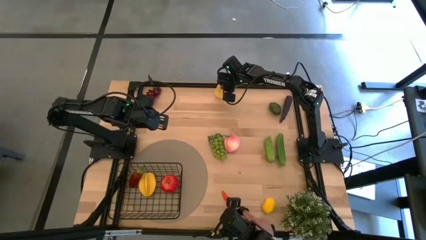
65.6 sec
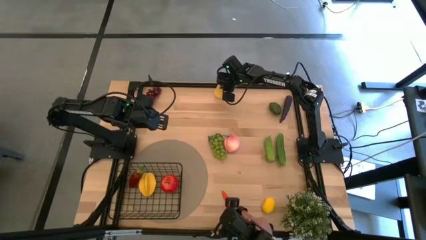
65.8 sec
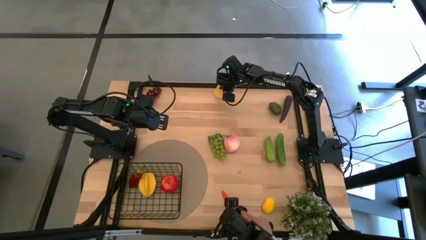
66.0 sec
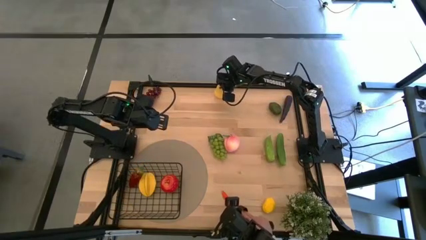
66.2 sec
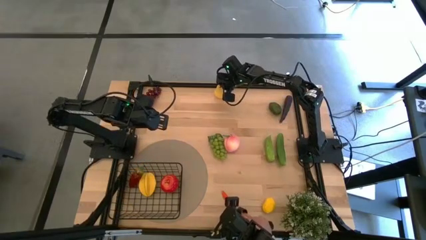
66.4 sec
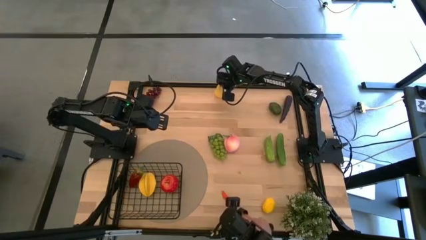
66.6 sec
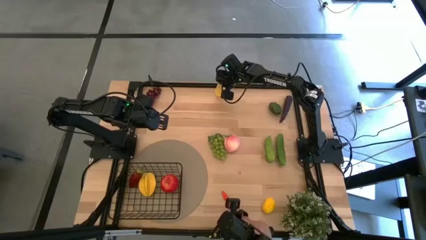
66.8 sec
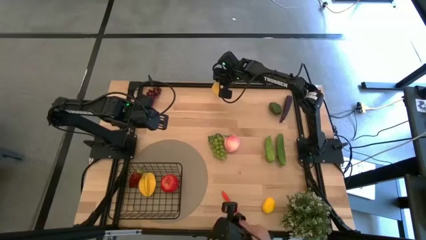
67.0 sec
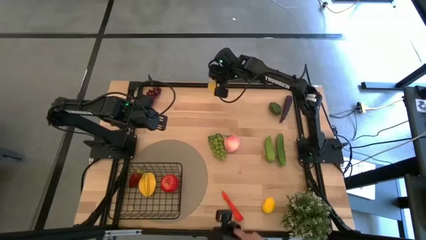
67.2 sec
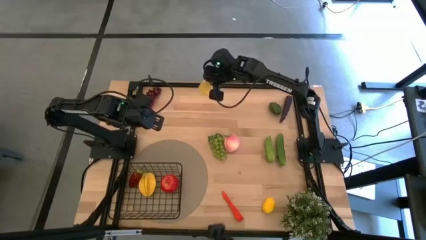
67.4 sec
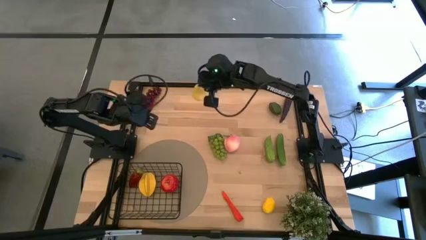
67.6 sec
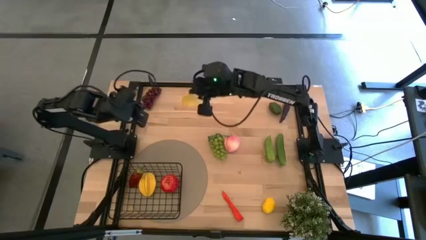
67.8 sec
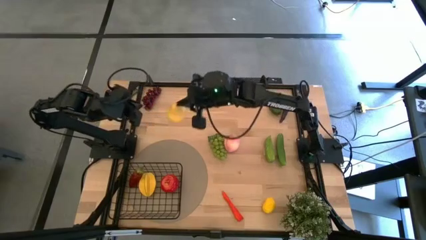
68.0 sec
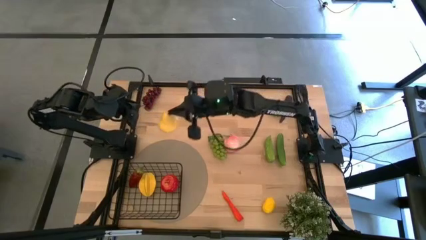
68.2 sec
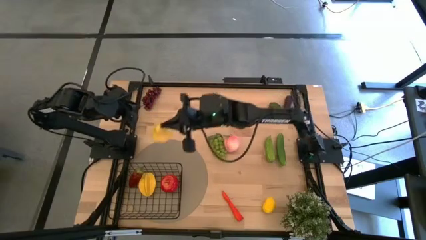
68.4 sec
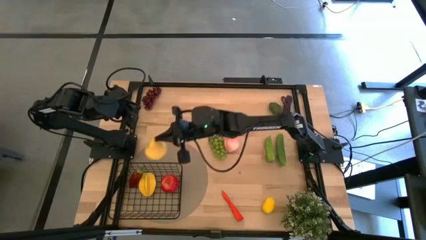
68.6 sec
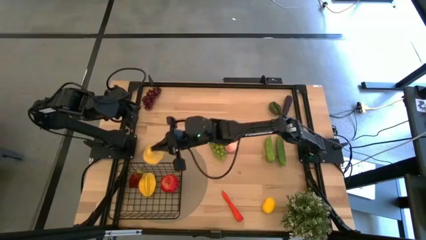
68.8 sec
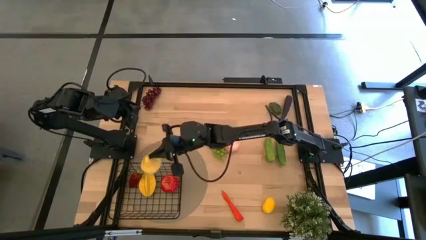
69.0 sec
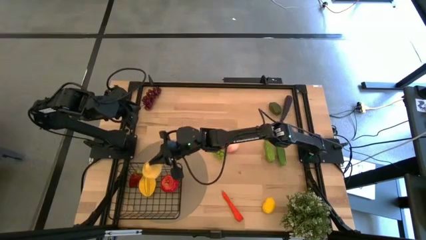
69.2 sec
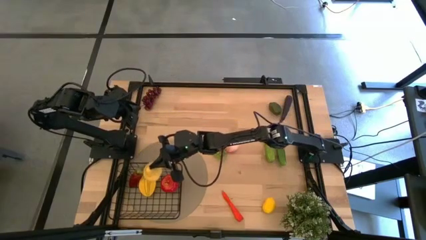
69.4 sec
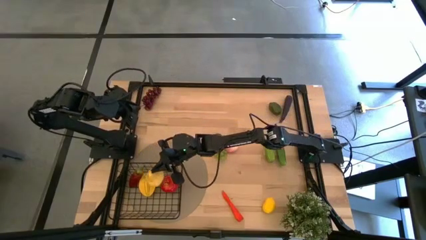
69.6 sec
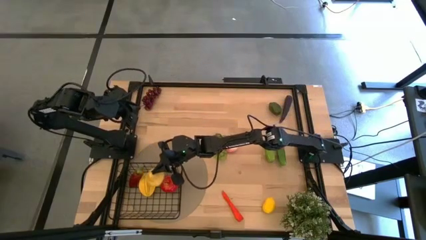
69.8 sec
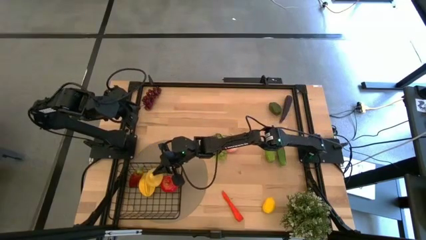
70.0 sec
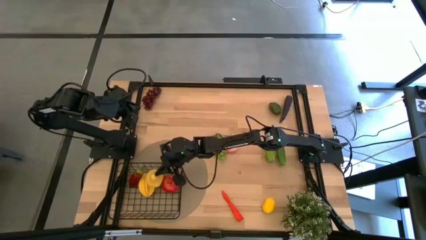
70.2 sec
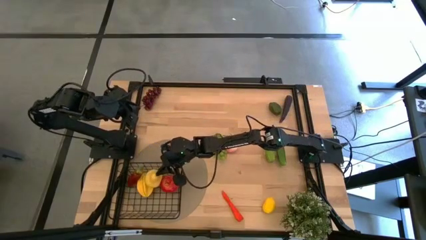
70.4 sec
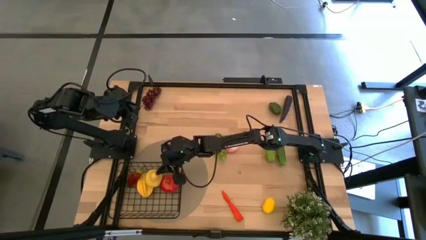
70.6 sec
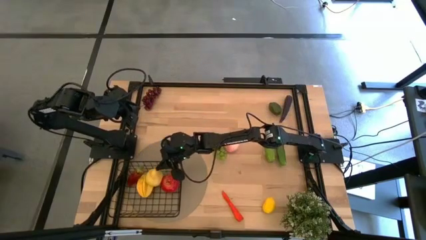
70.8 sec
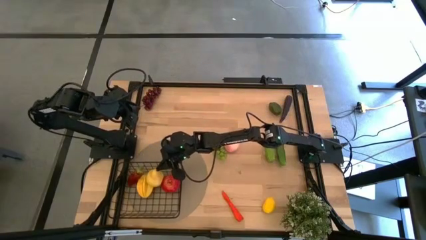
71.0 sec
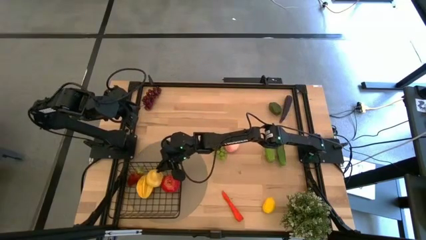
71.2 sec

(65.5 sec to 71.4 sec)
Task: Build produce basket
Put the yellow pear into wire basket

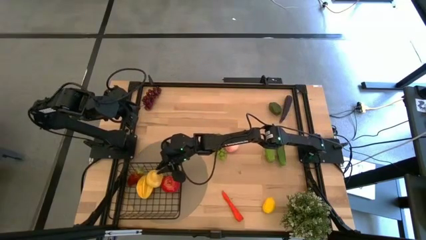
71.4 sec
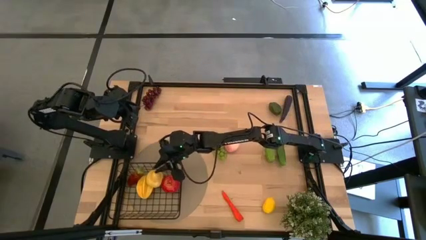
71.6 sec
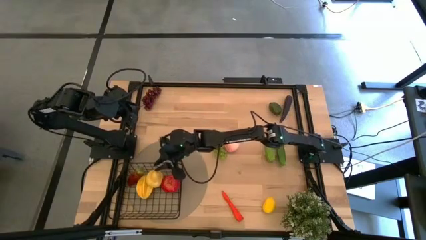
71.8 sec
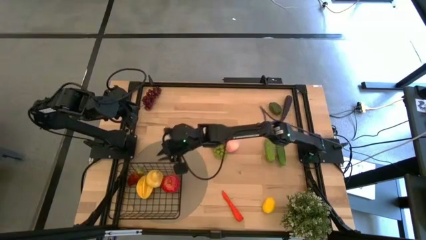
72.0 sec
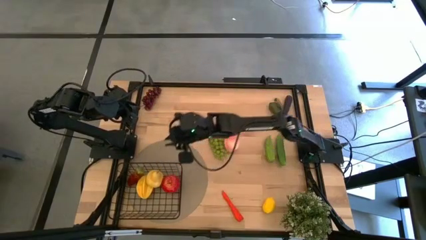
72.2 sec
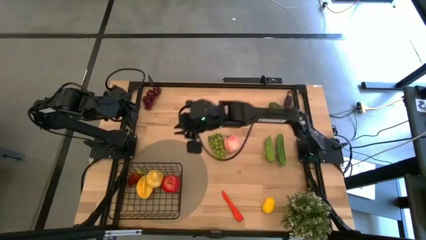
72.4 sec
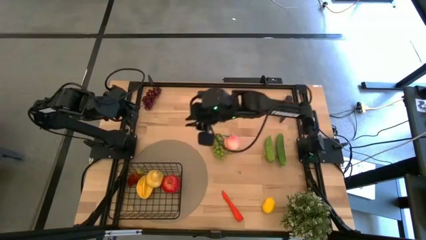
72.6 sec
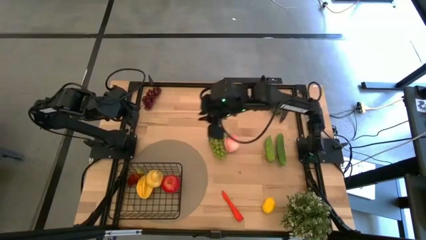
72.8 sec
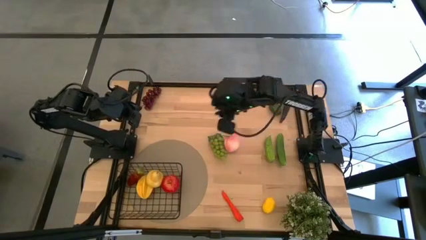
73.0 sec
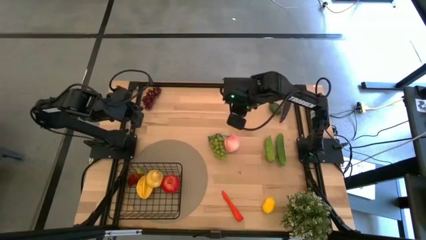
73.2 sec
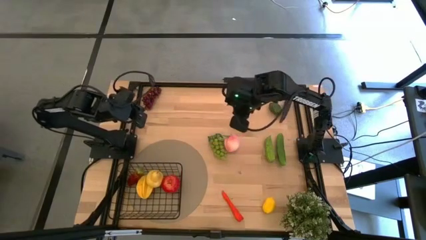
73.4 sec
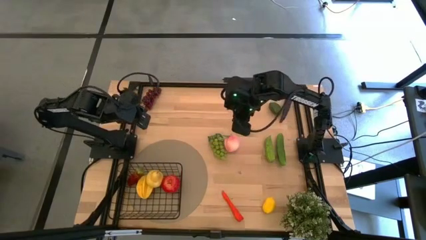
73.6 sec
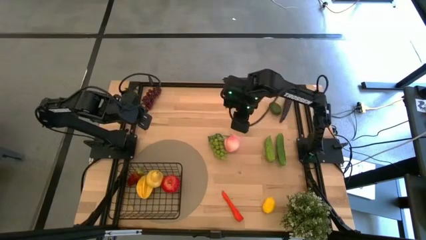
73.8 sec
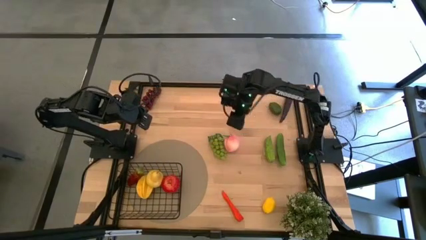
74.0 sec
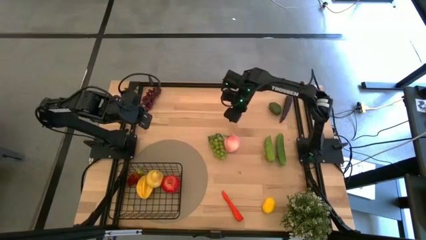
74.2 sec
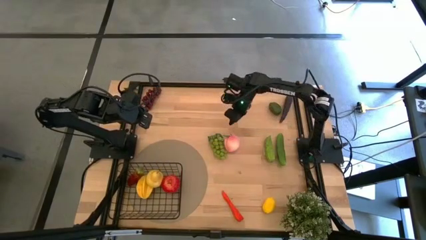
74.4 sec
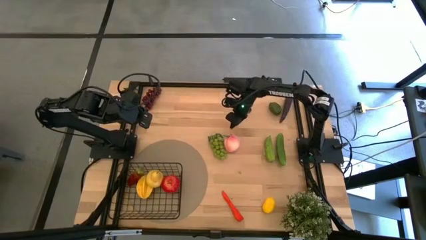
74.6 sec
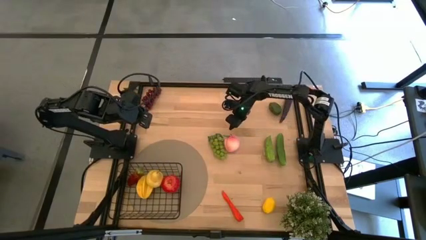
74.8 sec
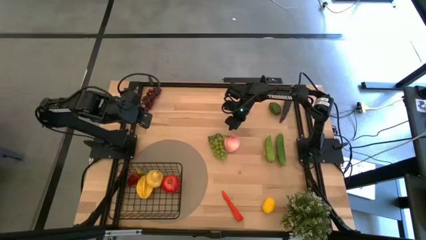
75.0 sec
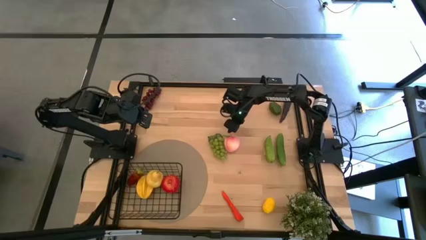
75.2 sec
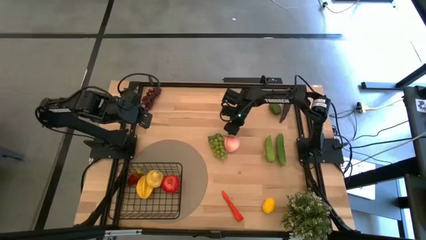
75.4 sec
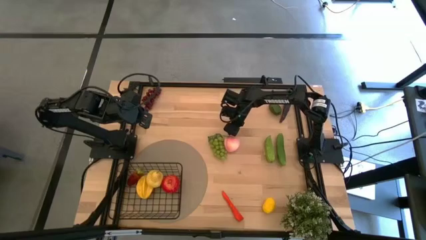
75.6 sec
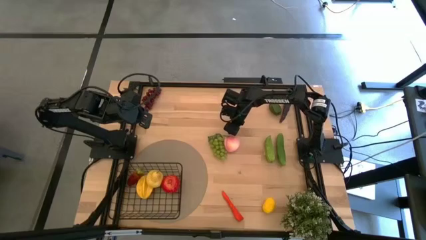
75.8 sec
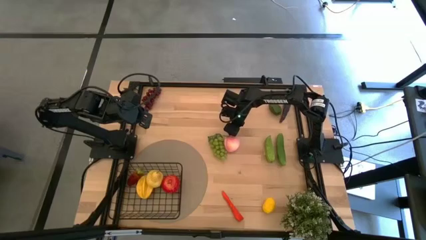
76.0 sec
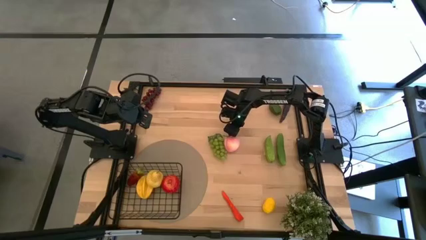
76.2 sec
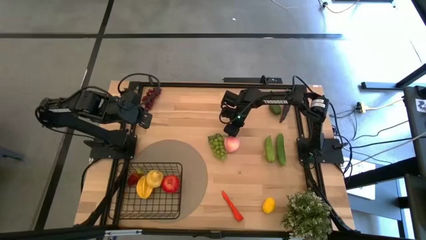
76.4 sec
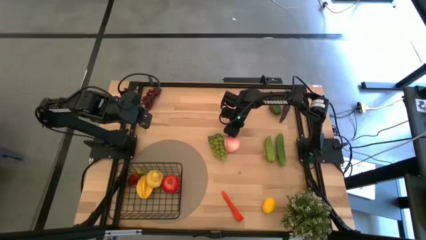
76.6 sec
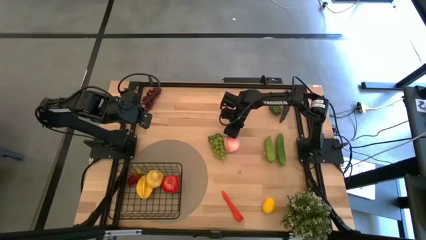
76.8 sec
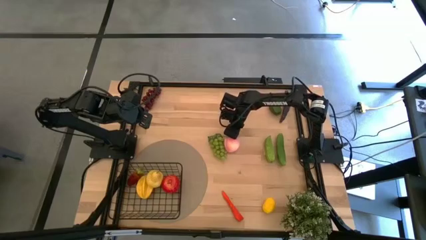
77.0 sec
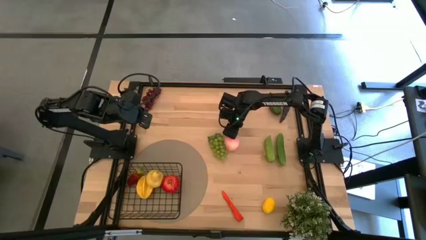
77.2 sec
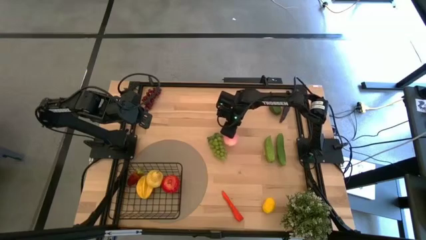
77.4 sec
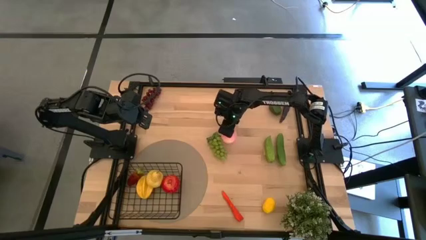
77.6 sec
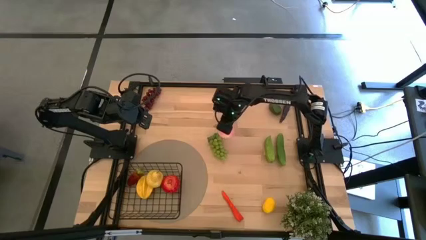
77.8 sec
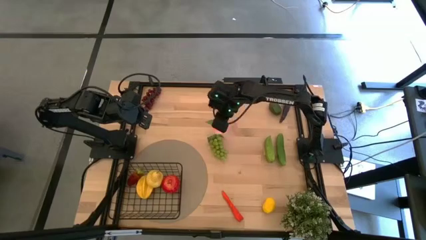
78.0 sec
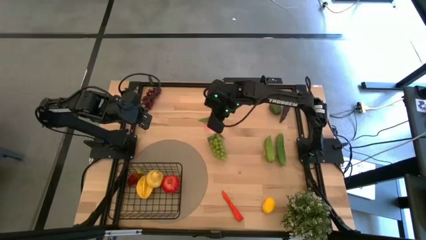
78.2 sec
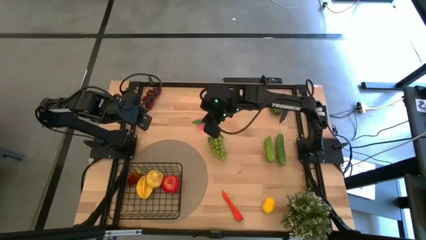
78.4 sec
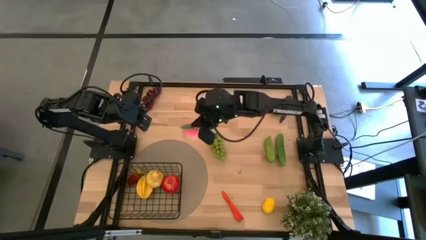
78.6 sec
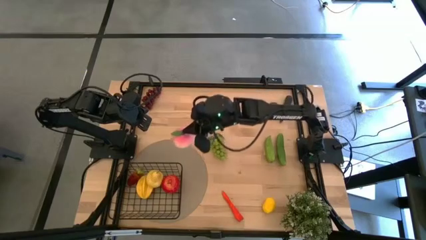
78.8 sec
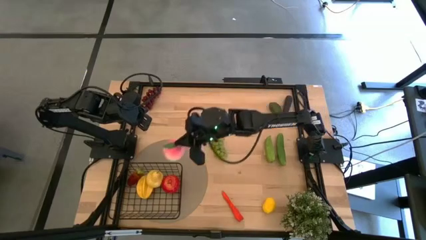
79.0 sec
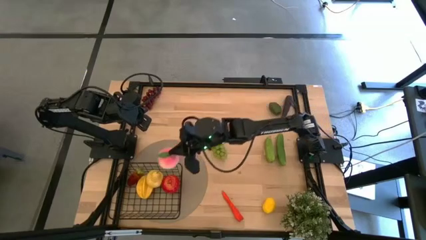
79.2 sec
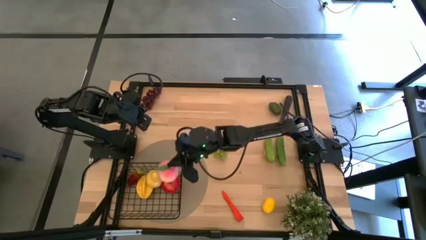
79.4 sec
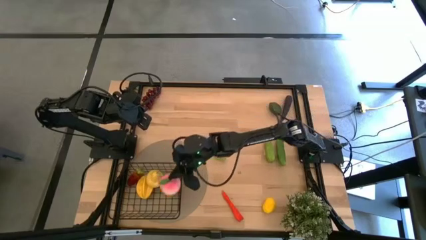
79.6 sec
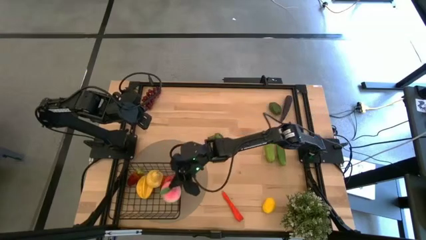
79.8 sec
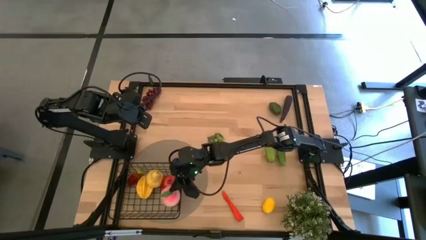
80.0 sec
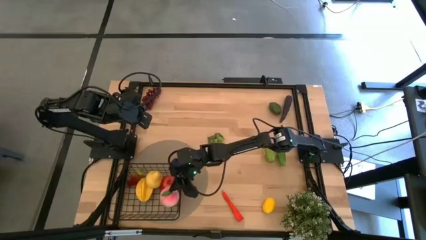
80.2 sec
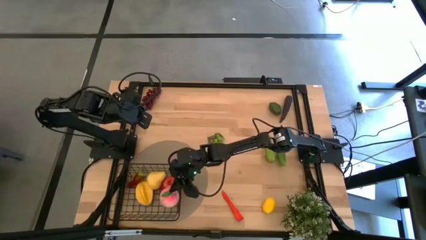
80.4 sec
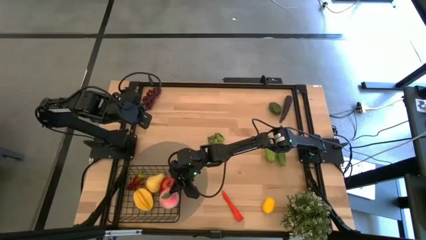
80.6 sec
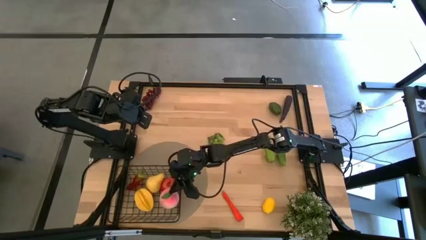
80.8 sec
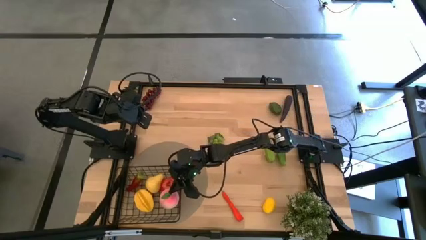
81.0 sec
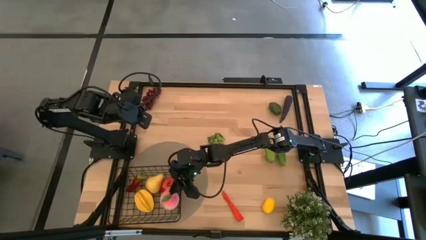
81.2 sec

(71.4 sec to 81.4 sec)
Put the pink peach into the wire basket
